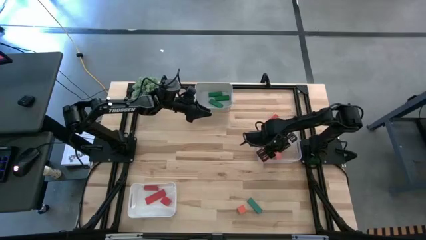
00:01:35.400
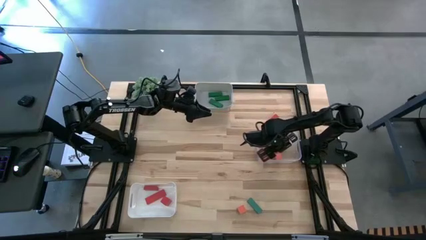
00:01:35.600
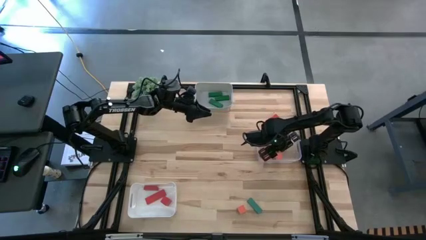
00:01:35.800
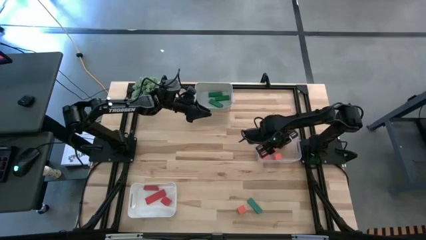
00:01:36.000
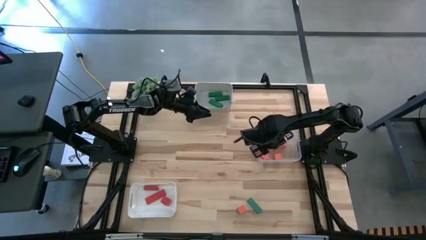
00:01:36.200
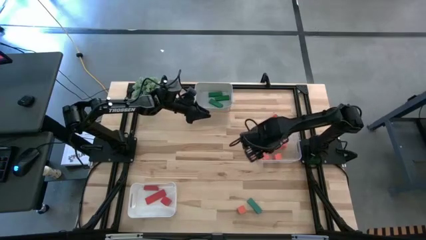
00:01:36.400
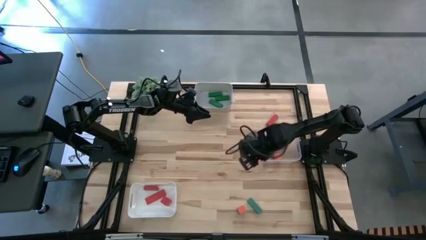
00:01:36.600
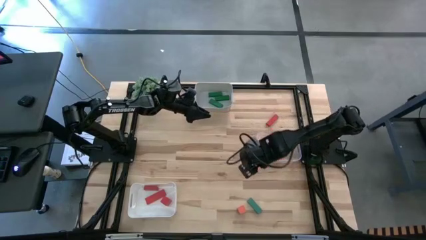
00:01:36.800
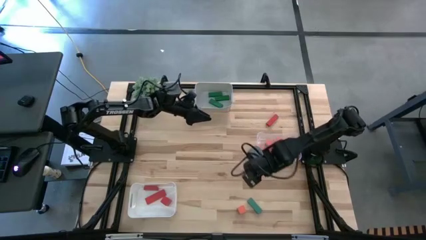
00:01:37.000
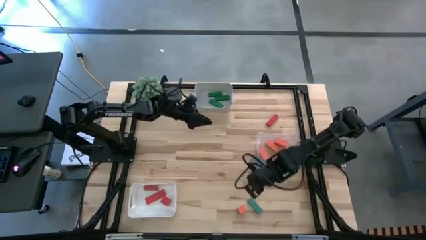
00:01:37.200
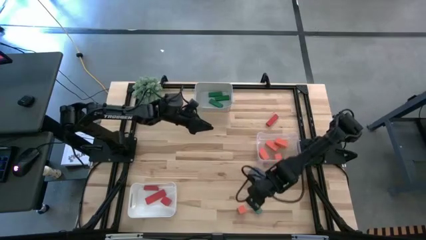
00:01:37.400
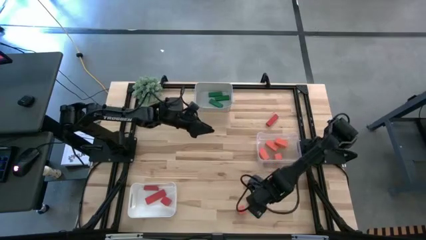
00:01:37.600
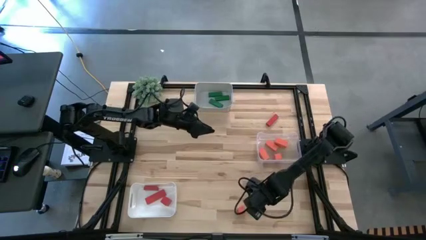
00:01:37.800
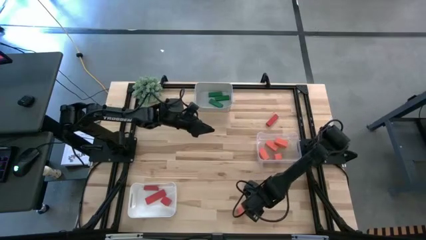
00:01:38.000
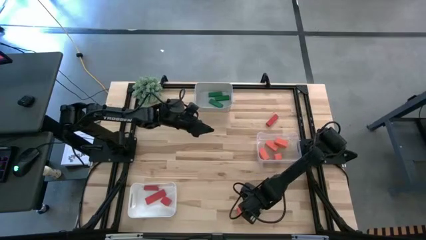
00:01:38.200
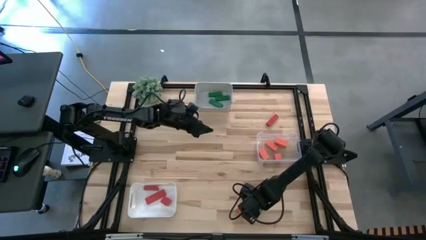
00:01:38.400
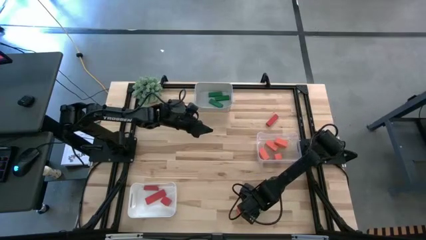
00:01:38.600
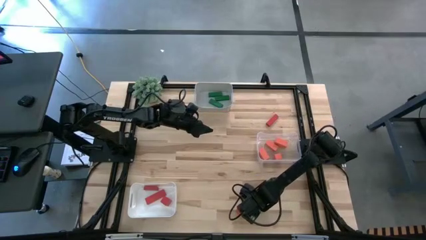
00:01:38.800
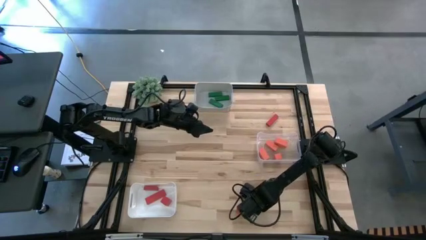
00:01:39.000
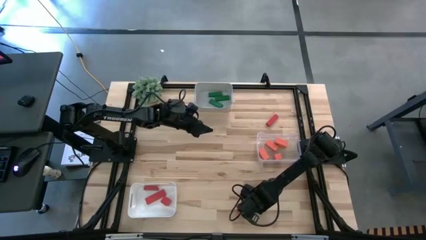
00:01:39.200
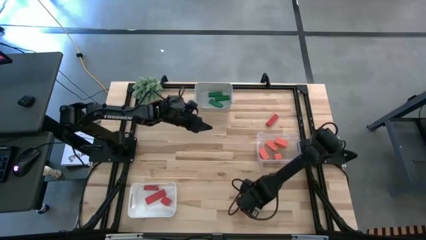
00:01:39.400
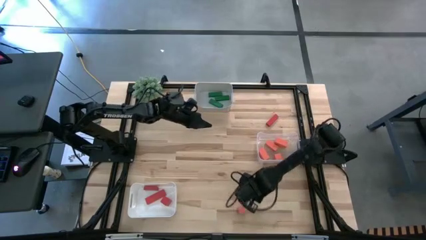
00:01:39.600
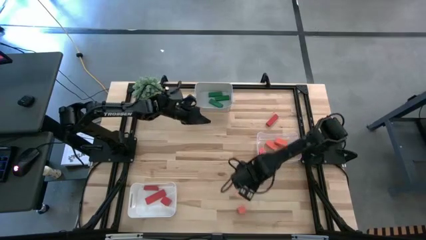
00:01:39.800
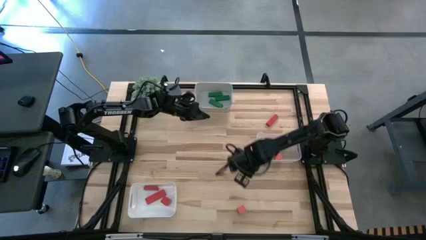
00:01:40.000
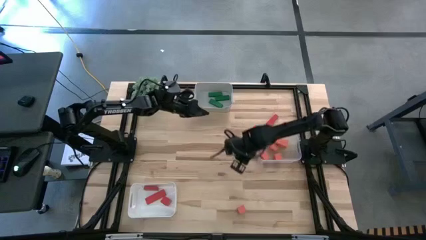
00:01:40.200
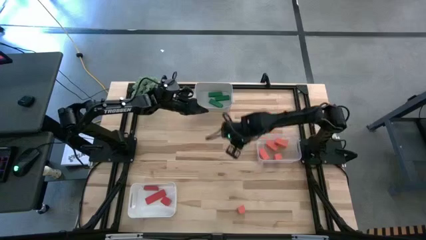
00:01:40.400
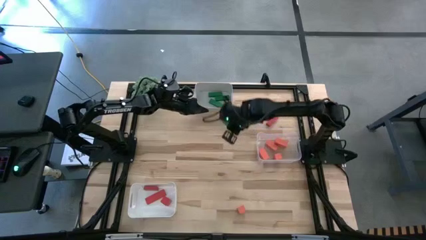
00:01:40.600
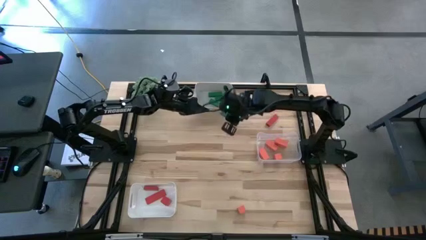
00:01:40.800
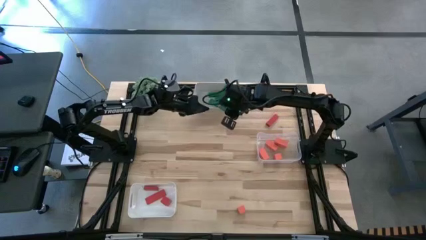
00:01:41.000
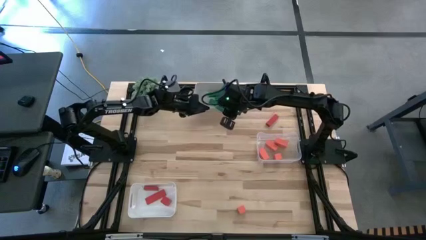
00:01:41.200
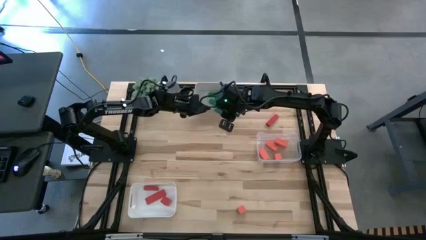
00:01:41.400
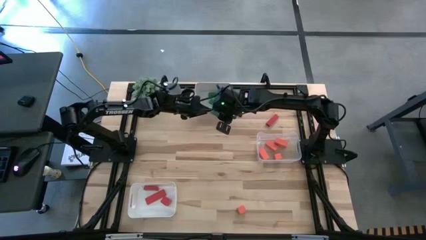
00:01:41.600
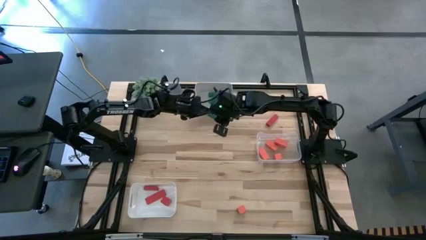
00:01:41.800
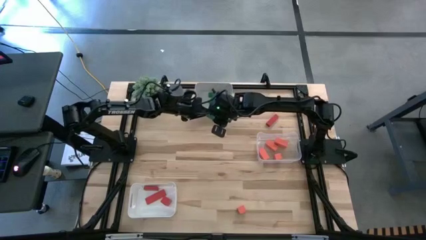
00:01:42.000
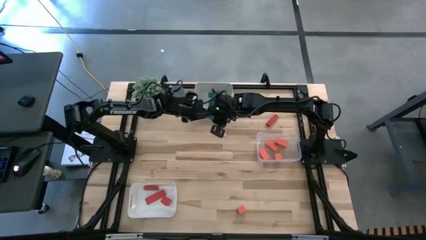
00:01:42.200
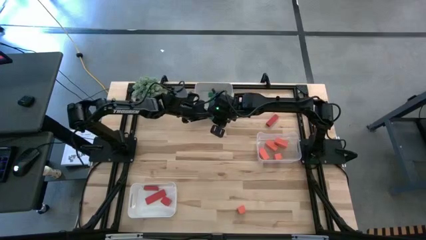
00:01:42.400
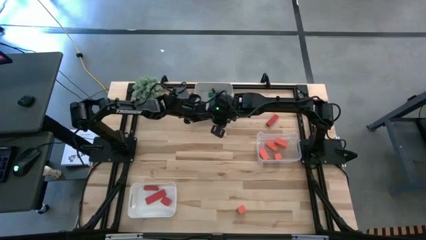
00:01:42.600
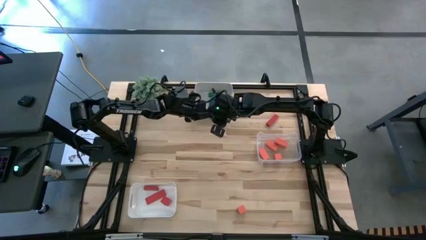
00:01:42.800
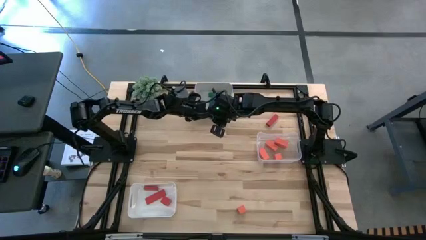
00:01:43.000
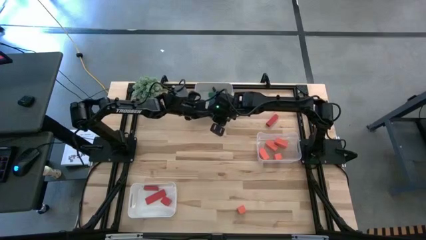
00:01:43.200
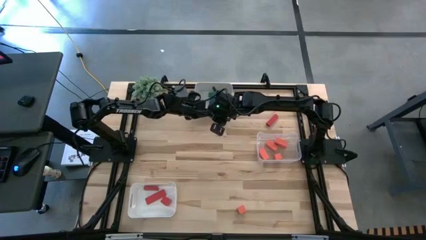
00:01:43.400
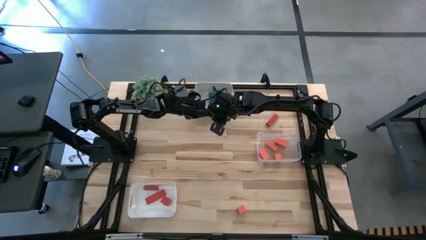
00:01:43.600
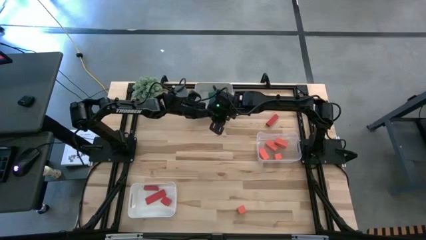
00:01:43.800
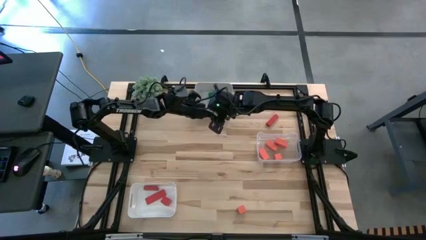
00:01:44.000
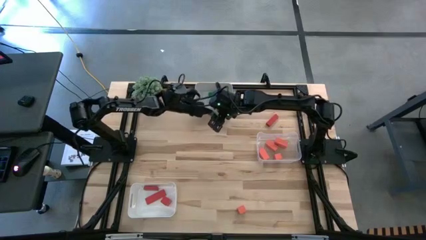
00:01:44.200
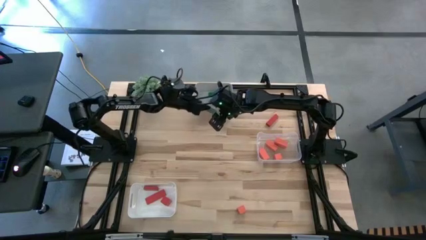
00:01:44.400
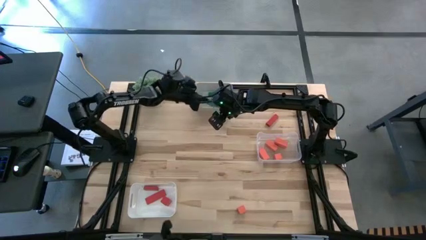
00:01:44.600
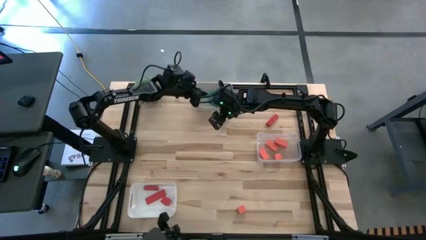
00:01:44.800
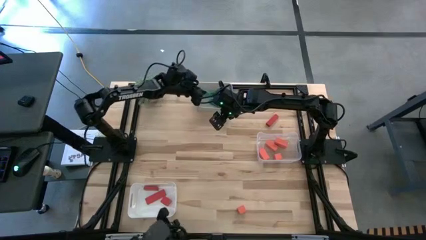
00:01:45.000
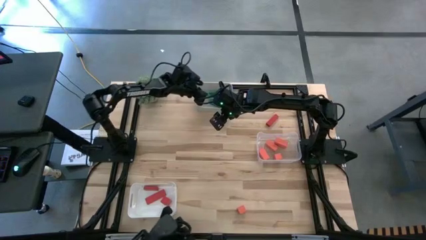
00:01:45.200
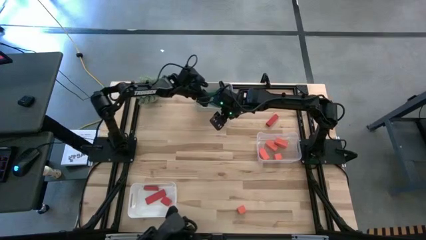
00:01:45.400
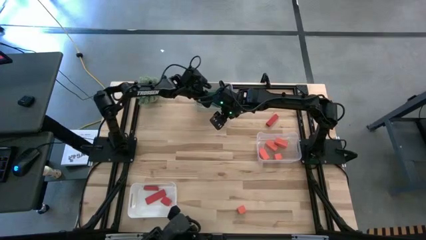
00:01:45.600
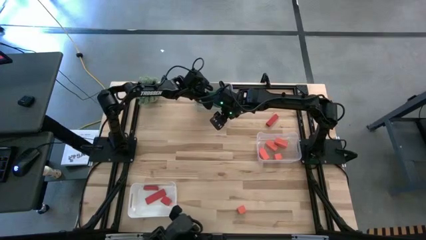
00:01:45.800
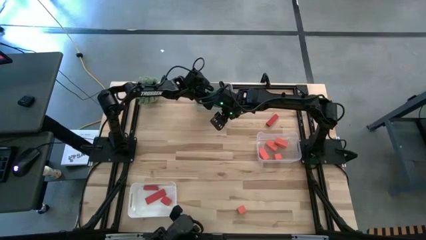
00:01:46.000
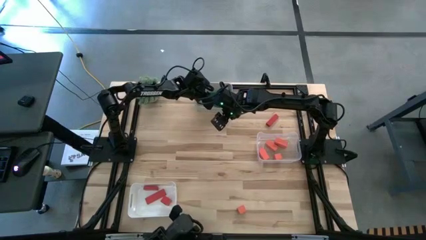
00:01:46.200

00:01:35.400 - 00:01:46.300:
Task: Sort & place blocks by color
Put the light green block into the gray bin

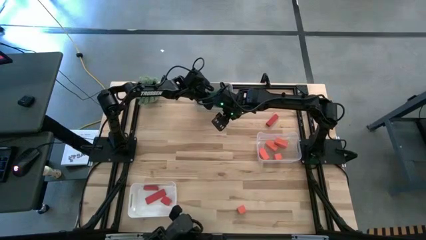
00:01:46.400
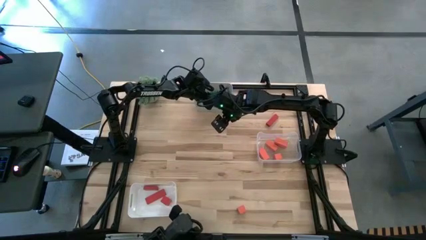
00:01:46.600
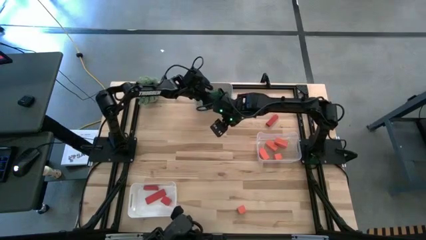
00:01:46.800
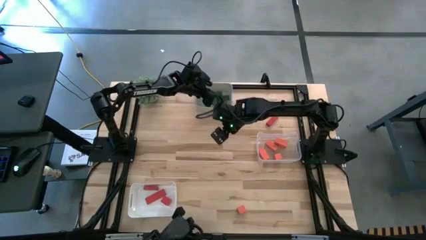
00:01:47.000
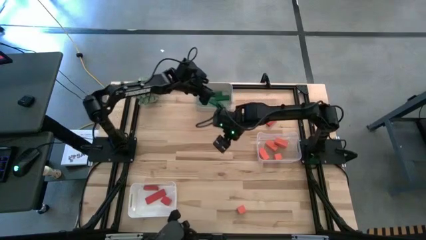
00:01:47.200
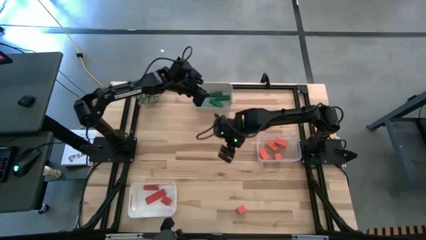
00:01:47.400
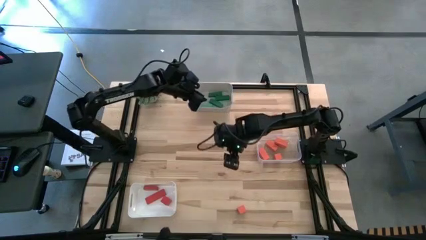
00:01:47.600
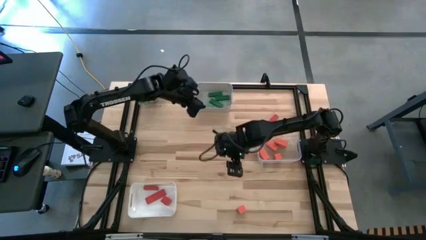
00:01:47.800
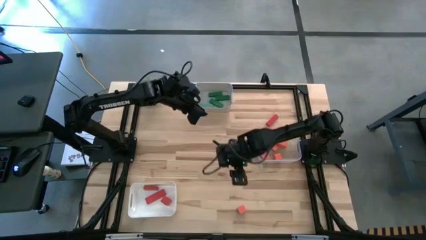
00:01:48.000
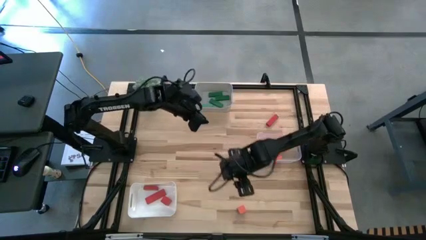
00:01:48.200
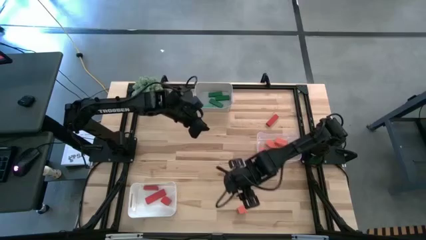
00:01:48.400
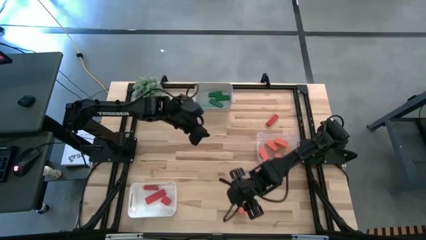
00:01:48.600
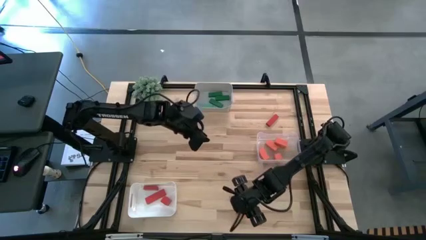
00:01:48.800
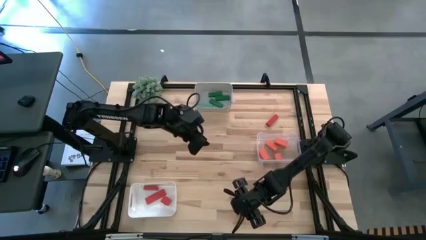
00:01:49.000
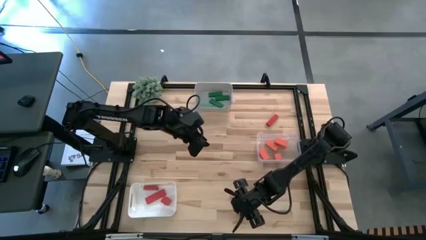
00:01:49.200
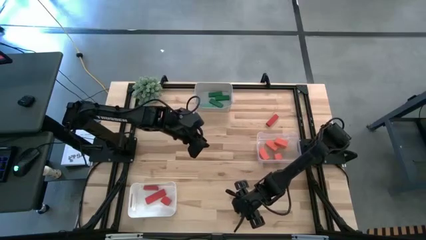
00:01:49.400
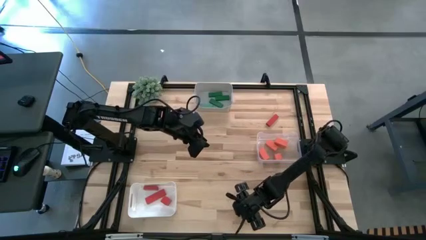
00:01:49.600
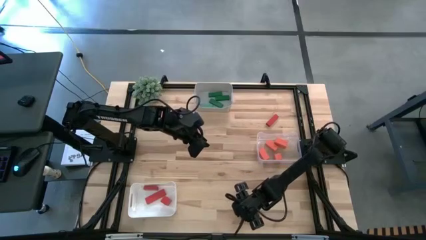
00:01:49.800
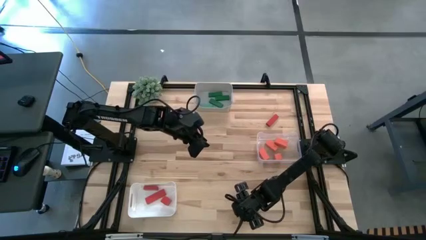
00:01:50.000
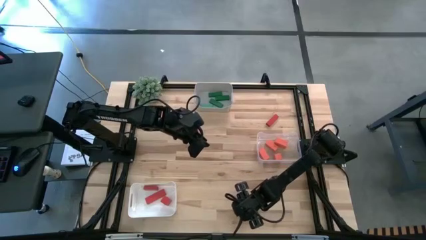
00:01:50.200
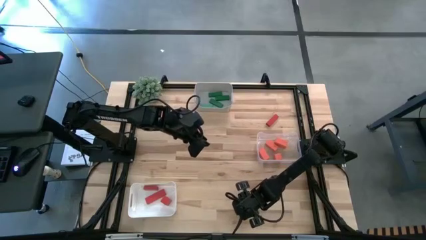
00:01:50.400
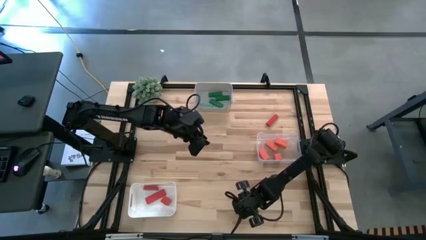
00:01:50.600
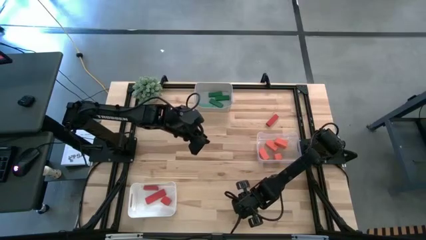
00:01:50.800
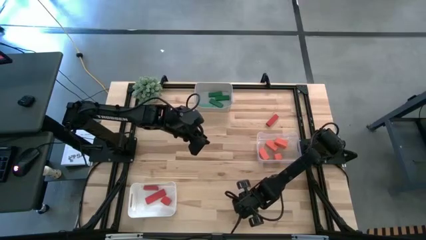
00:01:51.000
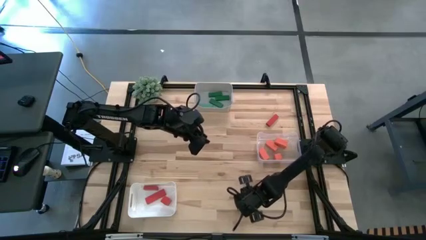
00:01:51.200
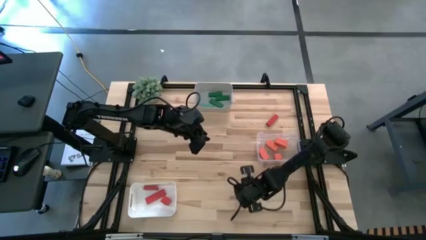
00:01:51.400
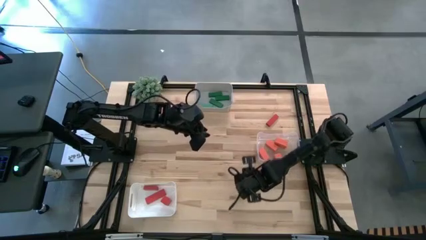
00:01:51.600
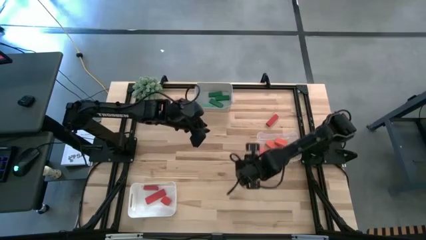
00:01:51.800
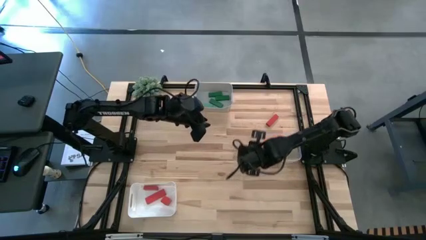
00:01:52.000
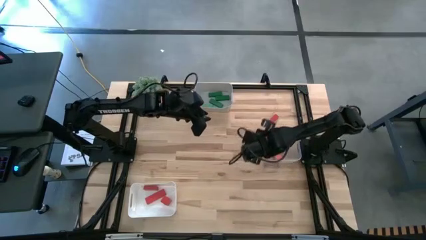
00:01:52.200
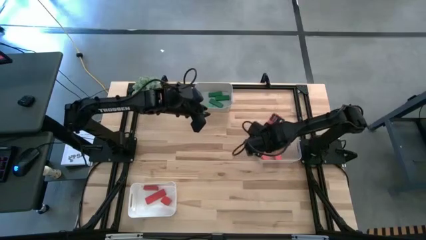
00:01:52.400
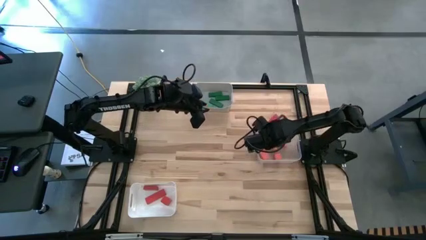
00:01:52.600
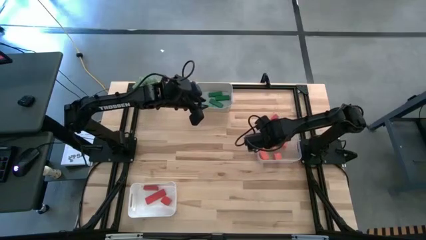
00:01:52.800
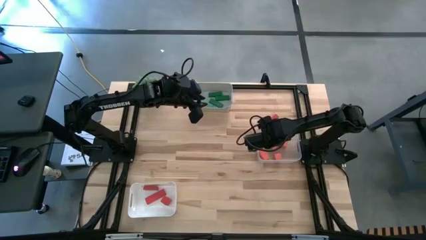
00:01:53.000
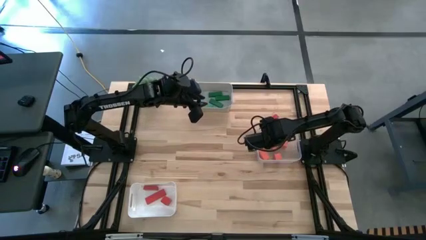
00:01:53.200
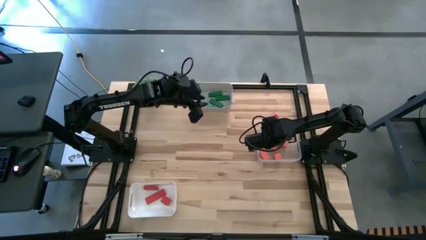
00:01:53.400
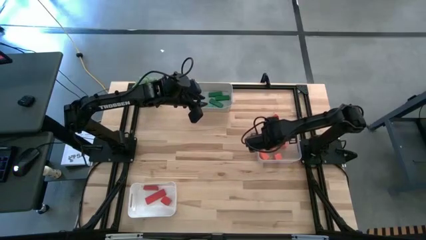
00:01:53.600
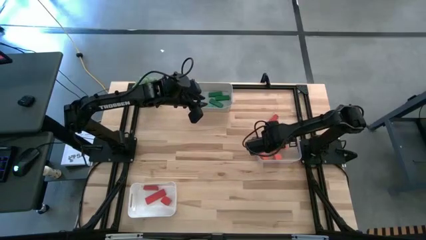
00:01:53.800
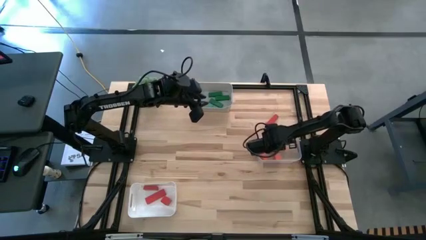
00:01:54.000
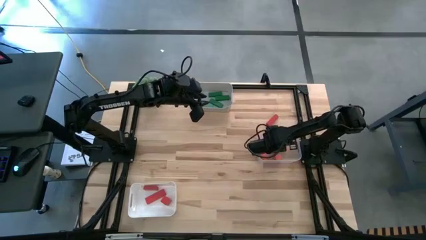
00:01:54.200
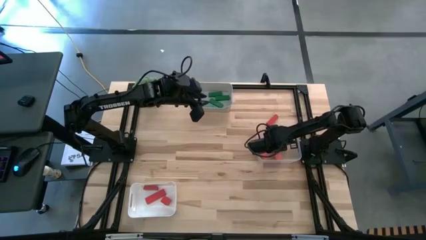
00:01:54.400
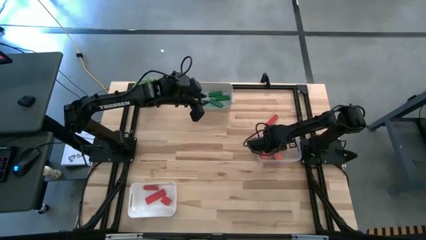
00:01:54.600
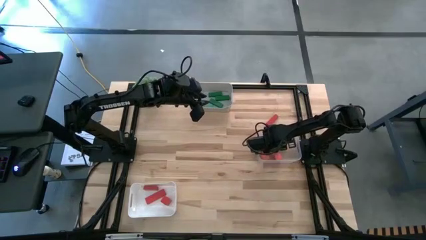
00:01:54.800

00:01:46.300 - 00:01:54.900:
Put the orange block into the transparent bin
